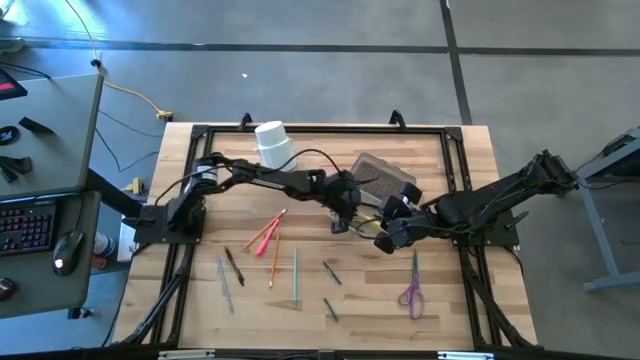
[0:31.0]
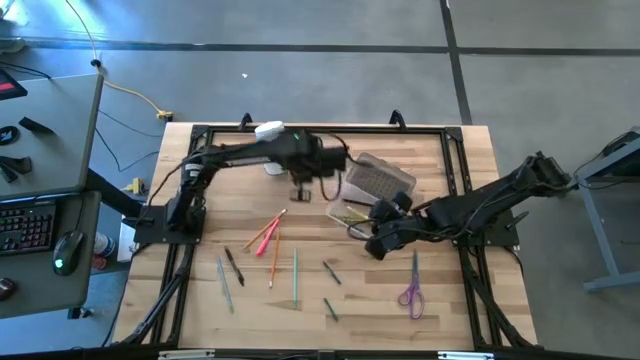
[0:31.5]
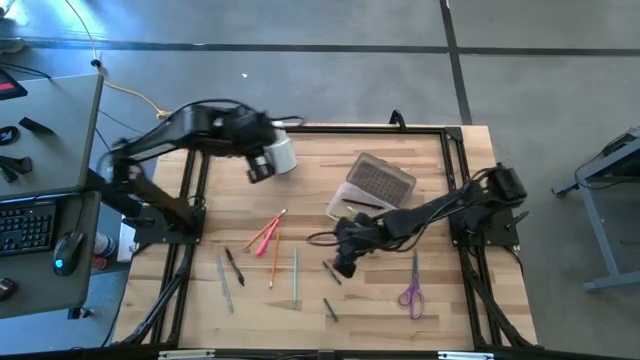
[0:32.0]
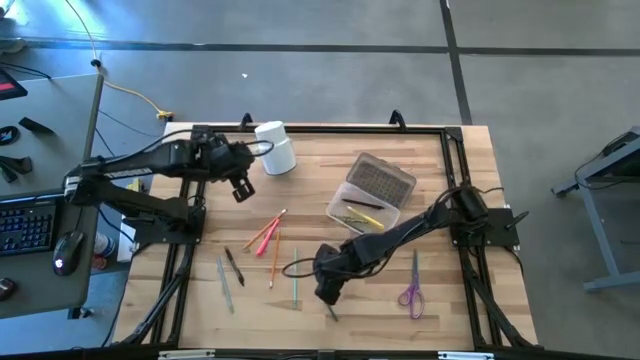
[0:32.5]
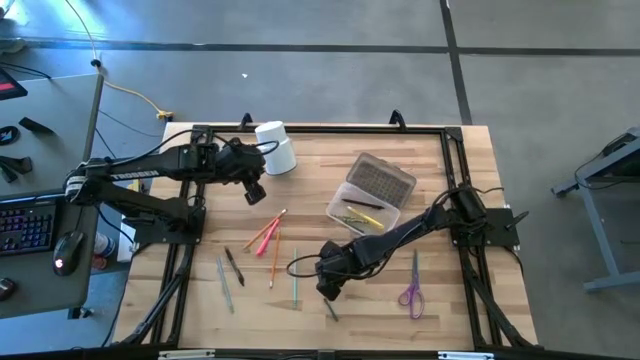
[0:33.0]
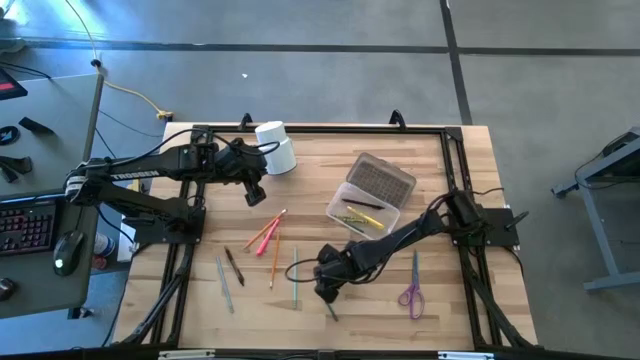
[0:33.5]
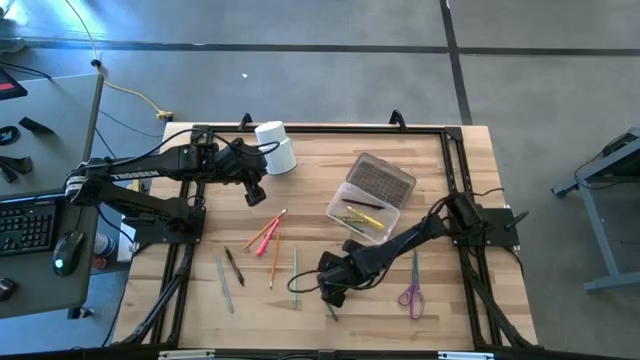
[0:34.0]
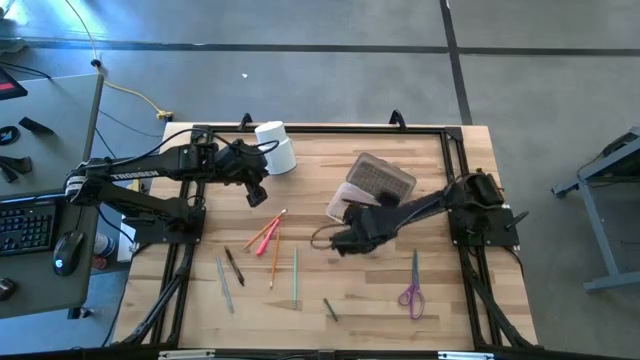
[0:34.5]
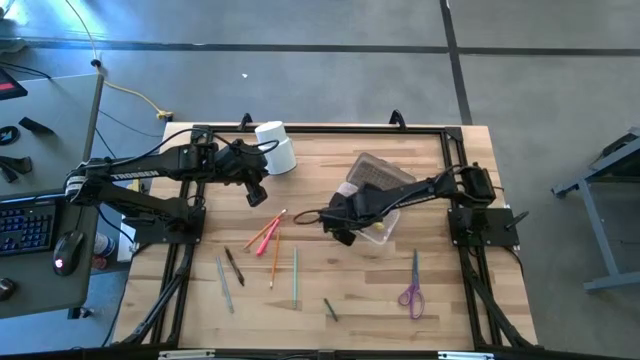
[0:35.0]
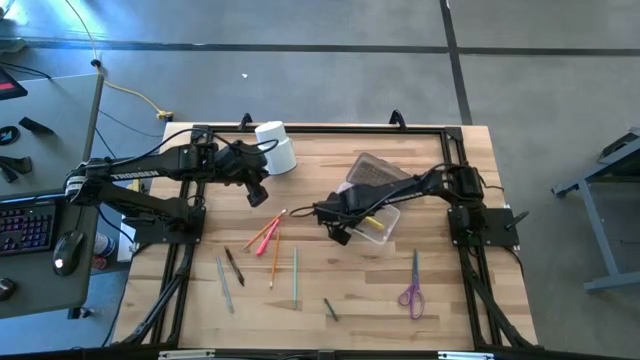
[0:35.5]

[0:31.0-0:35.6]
Task: Pick & place school supplies into a supply box
Put the top dark green crayon into the supply box

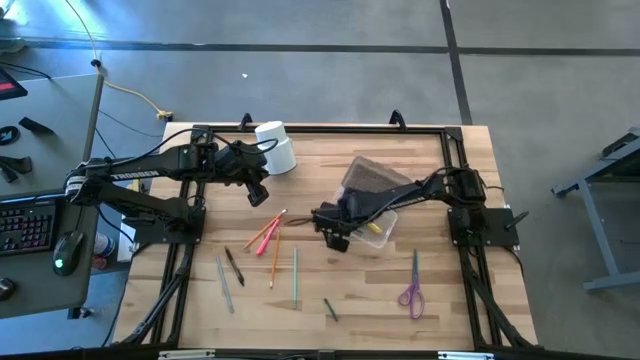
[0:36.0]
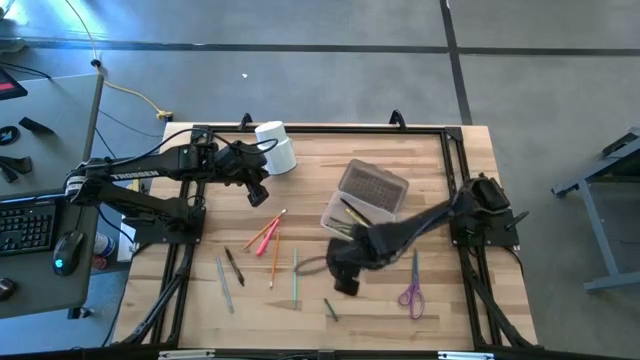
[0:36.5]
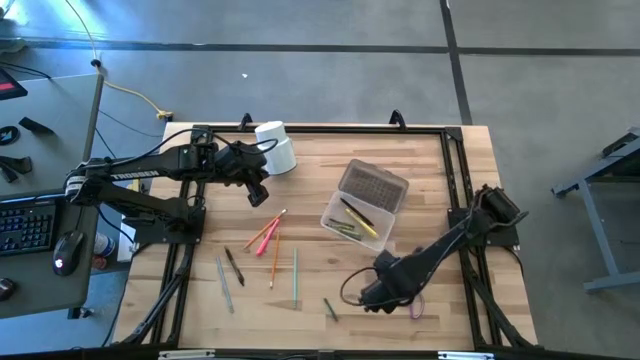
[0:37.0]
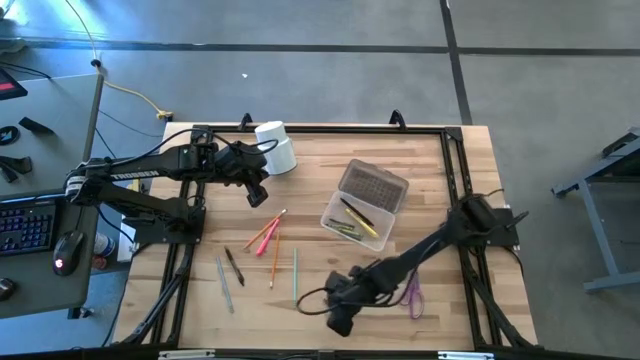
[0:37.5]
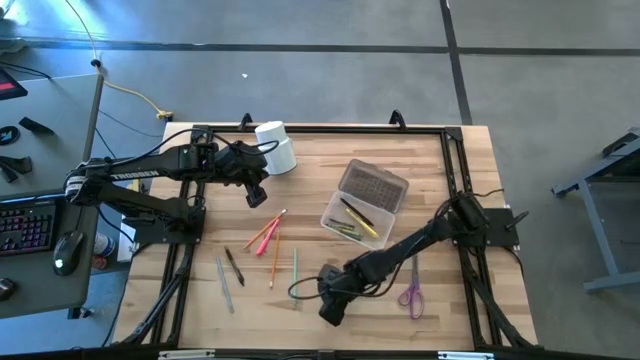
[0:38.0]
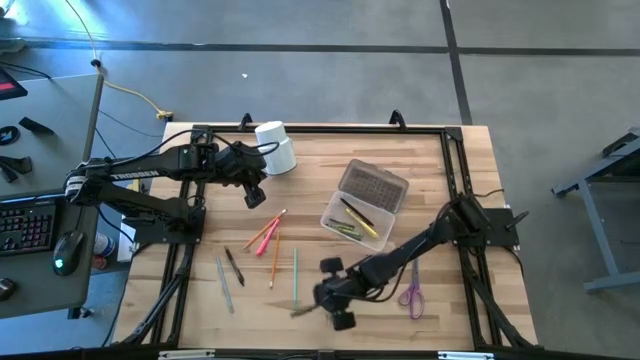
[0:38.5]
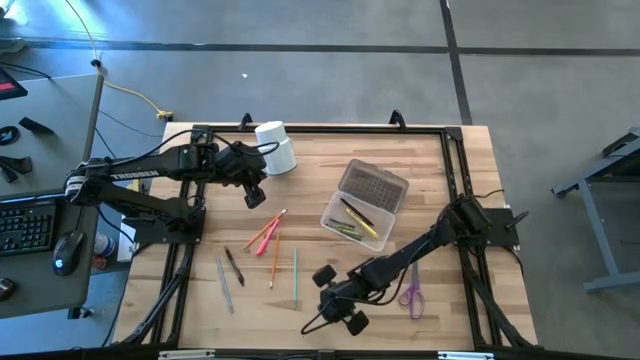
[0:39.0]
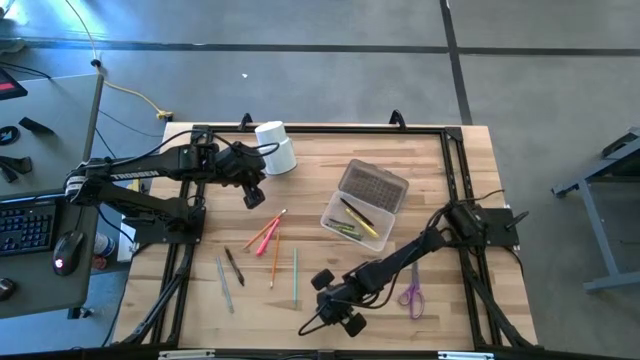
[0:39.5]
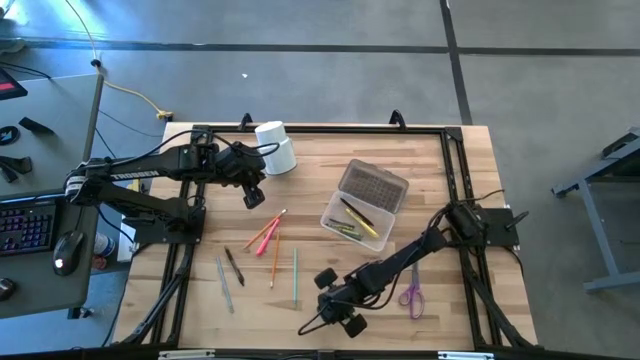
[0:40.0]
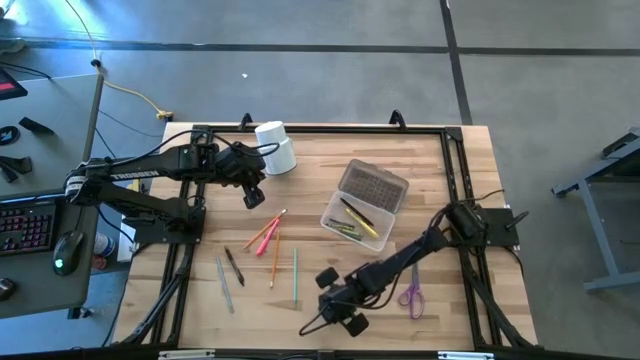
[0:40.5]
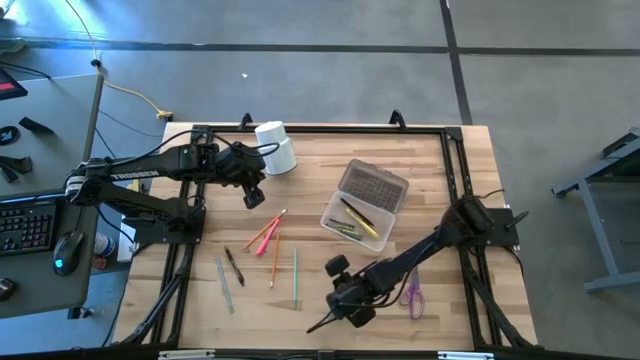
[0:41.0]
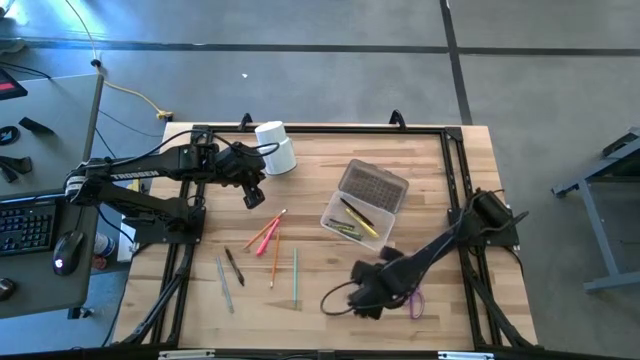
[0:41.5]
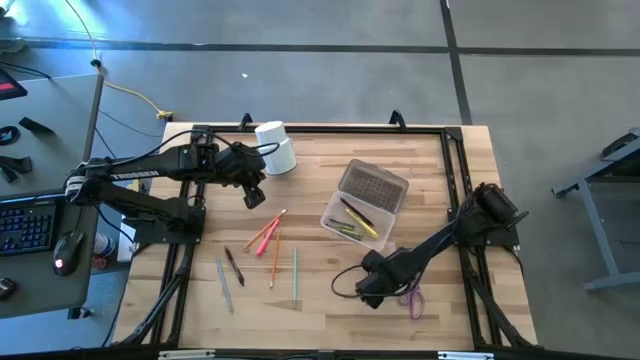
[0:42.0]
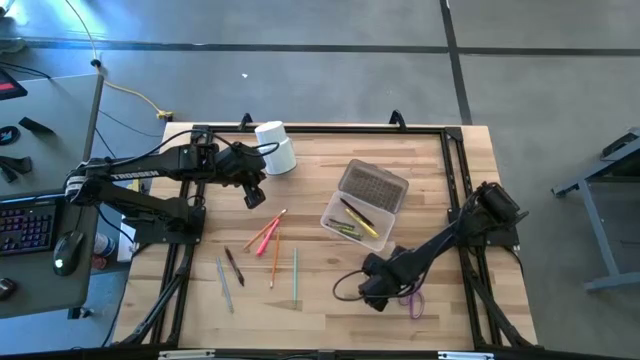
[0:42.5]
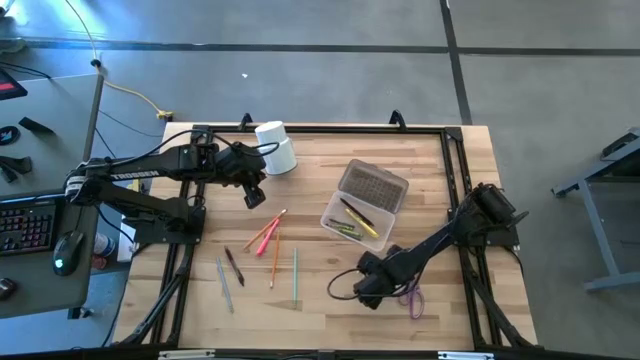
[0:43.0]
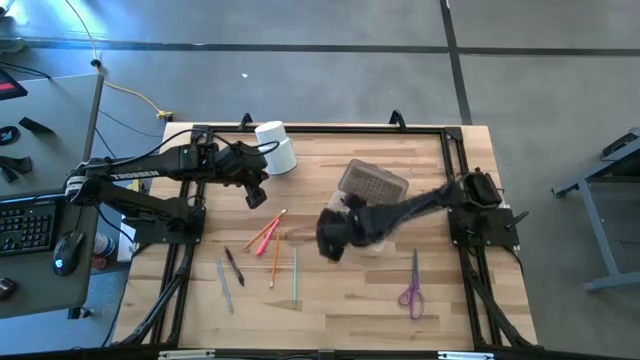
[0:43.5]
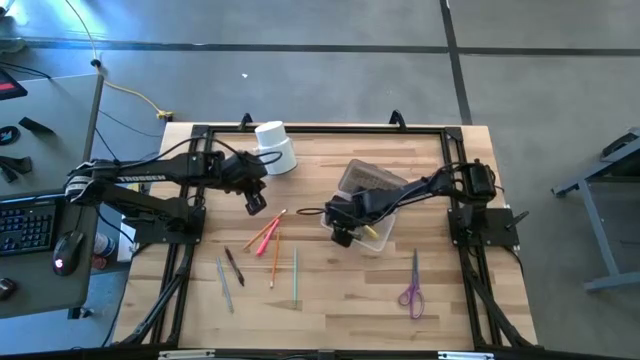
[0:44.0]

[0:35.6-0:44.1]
Put the dark green crayon into the supply box

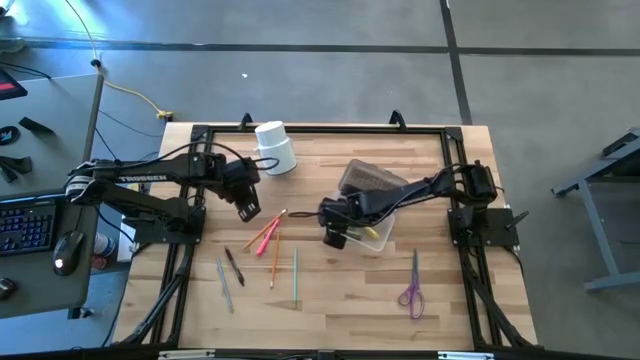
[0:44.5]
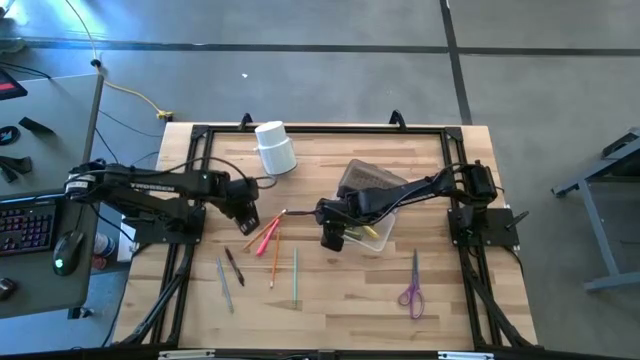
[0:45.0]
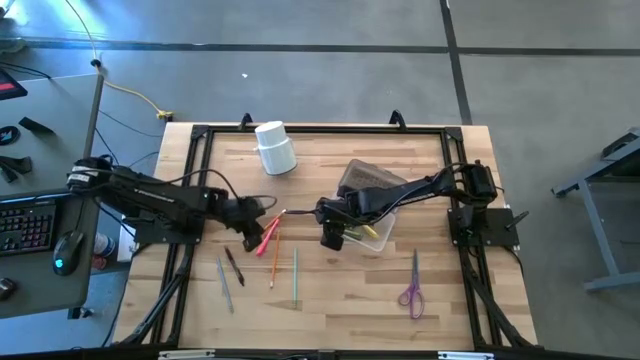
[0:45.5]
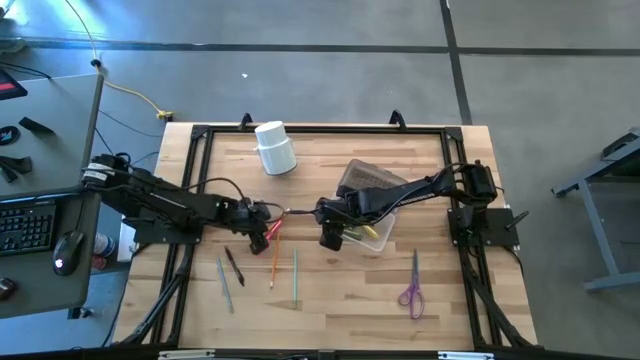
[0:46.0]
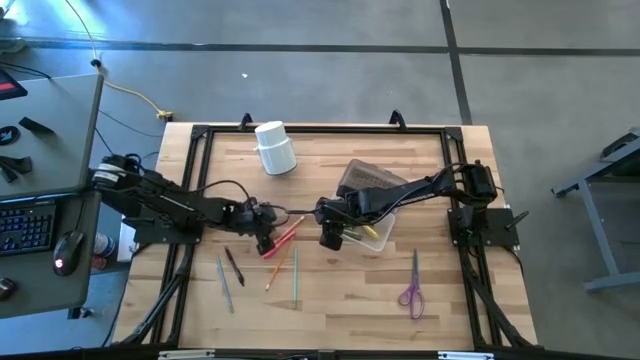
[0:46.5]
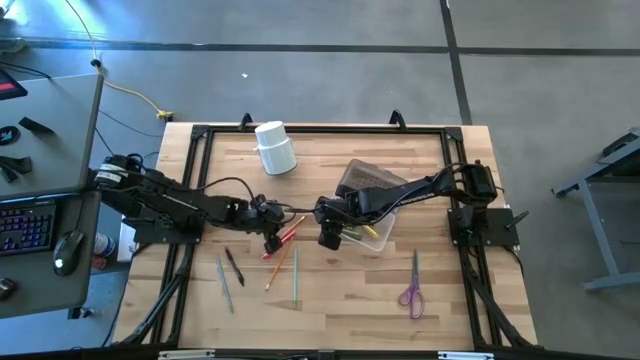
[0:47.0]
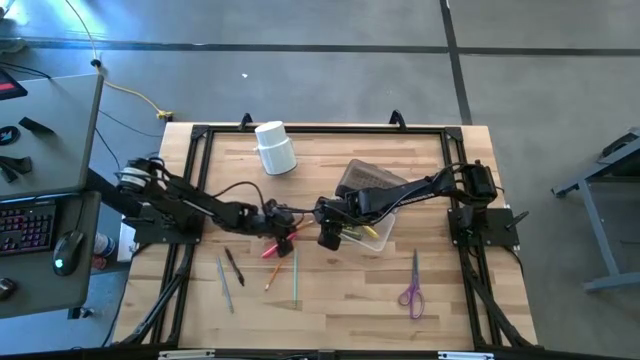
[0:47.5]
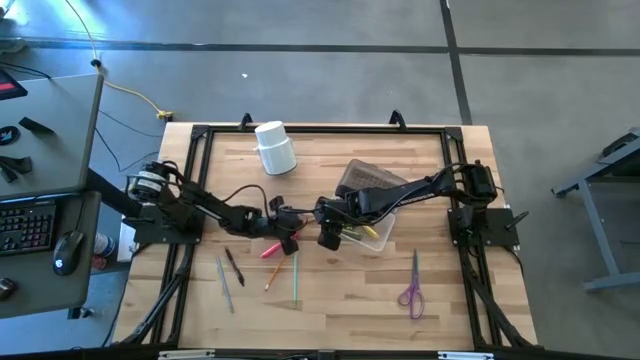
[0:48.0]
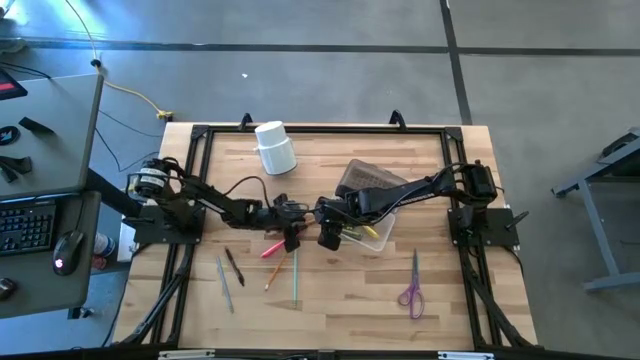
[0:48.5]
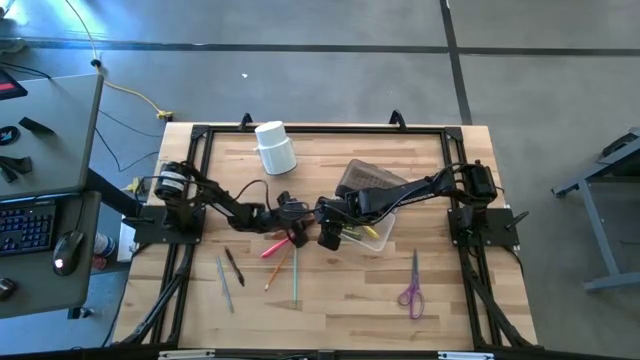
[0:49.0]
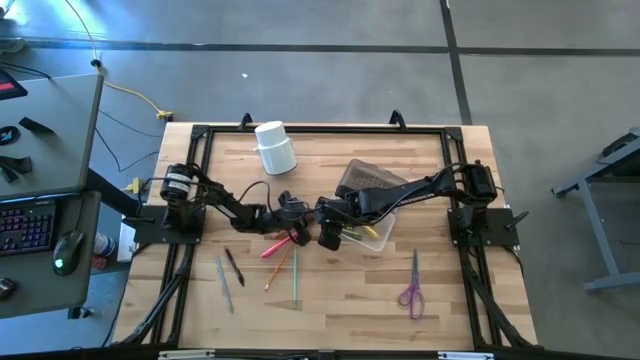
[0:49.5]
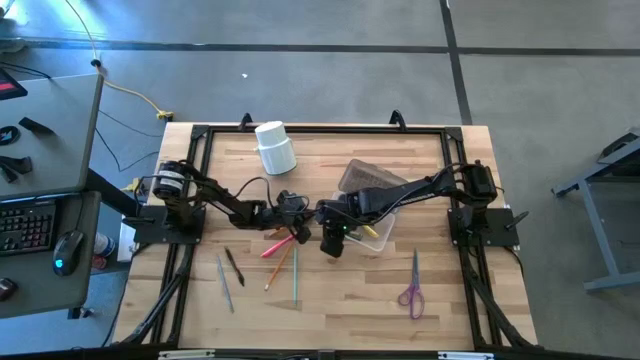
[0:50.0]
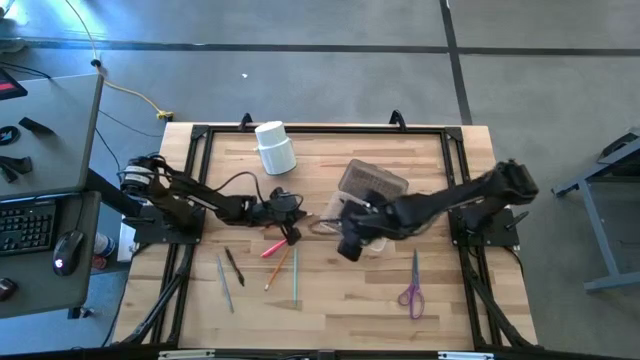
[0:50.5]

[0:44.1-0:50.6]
Put the top orange pencil into the supply box
